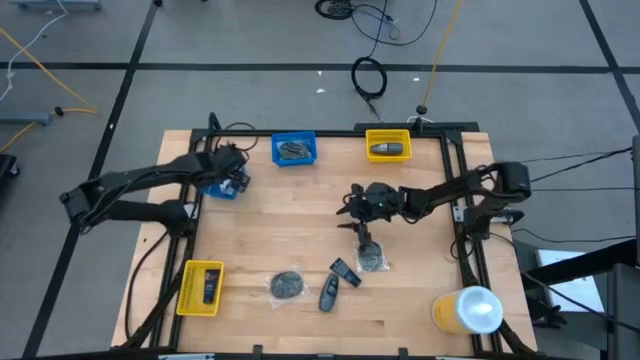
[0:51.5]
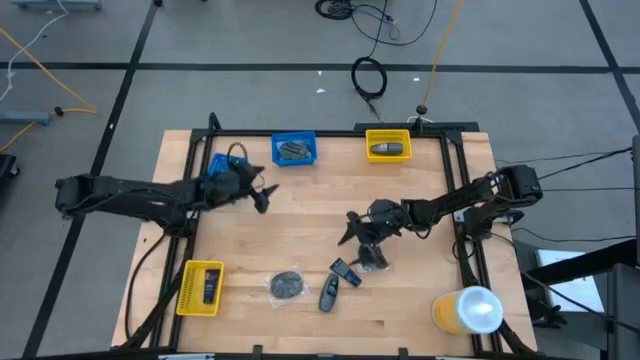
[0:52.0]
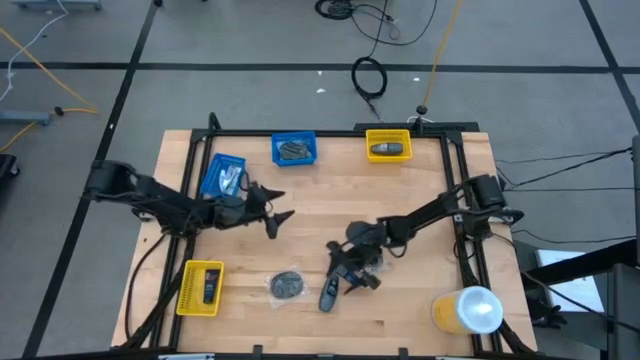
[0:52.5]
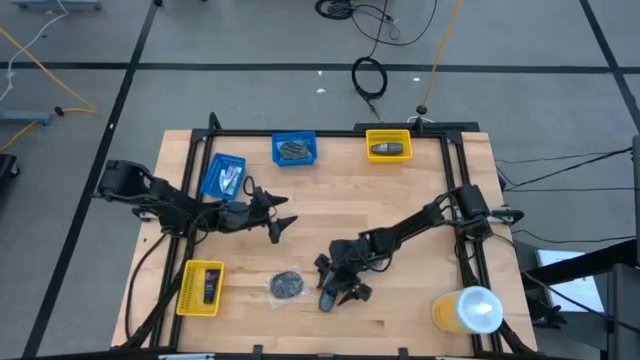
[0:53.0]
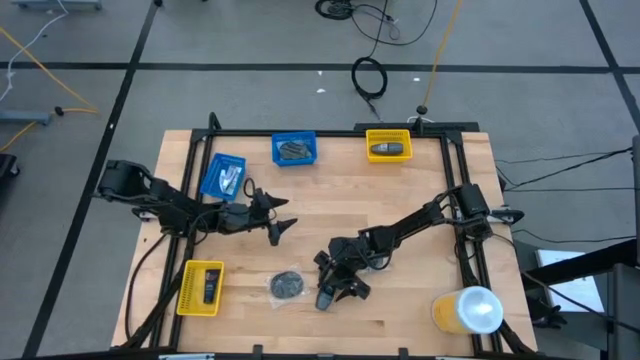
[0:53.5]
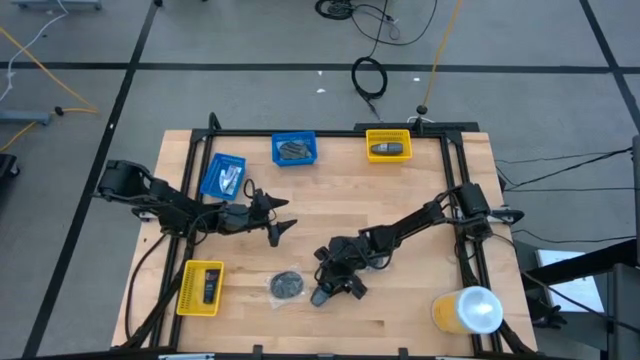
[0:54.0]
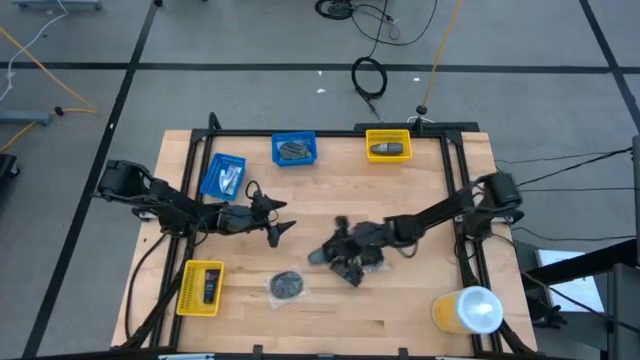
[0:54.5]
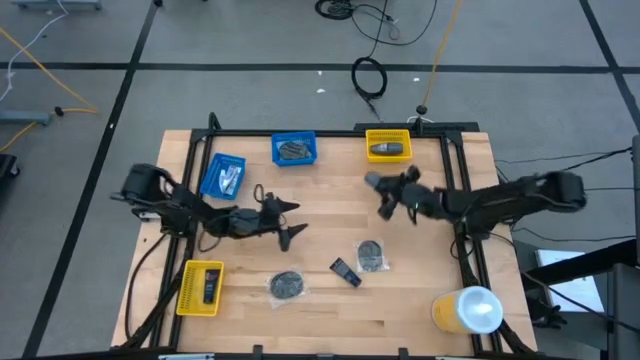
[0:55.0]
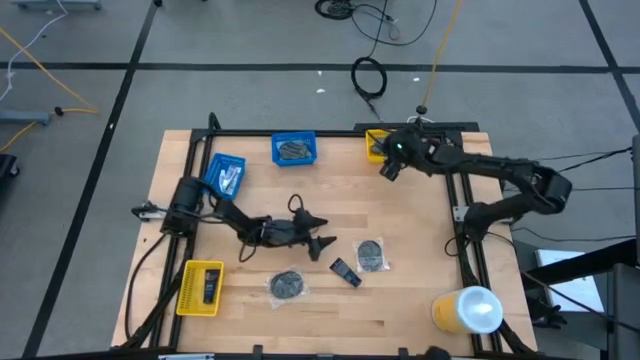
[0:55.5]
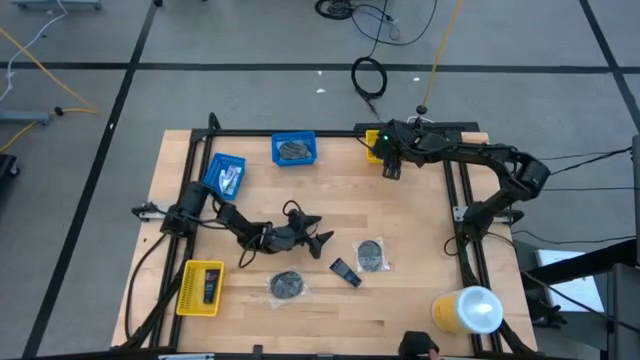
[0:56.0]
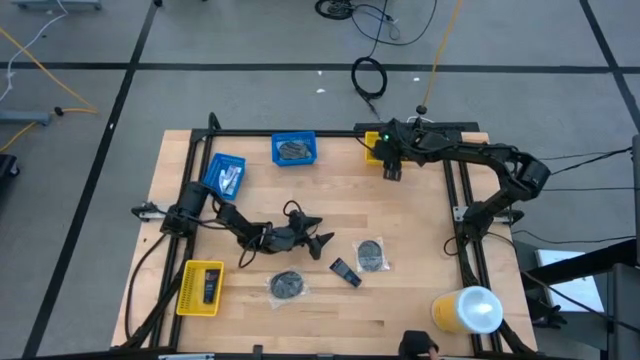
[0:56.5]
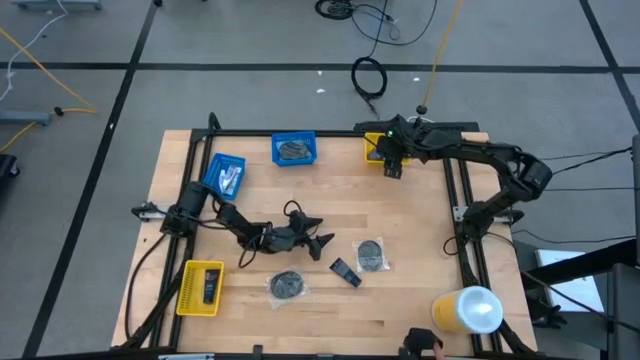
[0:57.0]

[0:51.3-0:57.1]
Task: Pick & Place Travel size toiletries
Put the black deodorant into the top yellow bin

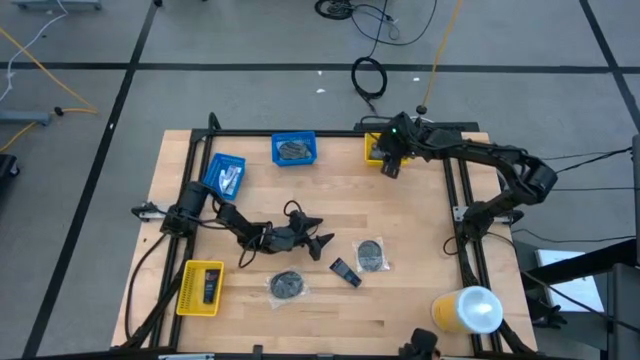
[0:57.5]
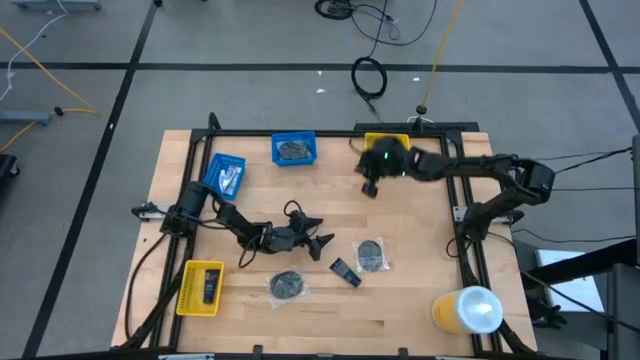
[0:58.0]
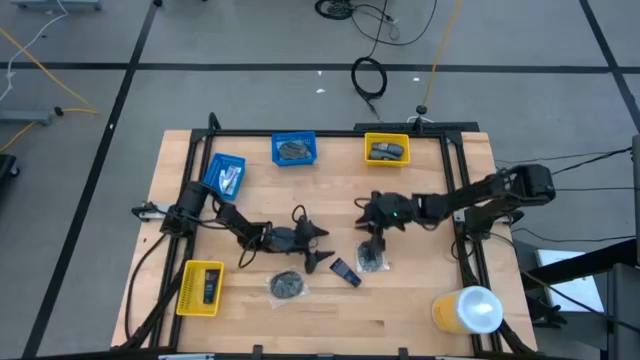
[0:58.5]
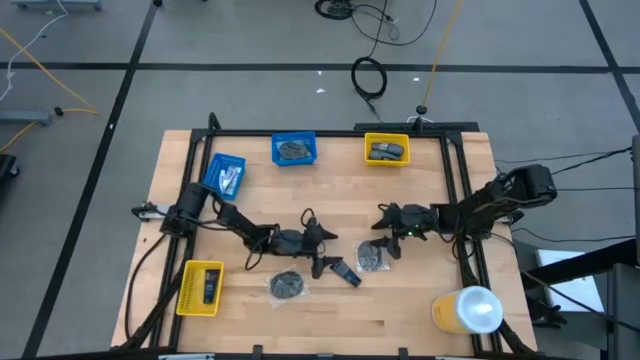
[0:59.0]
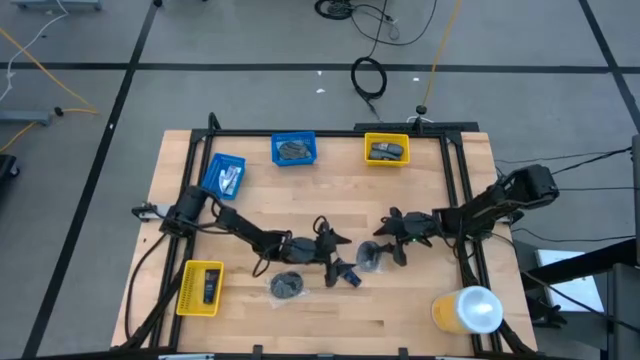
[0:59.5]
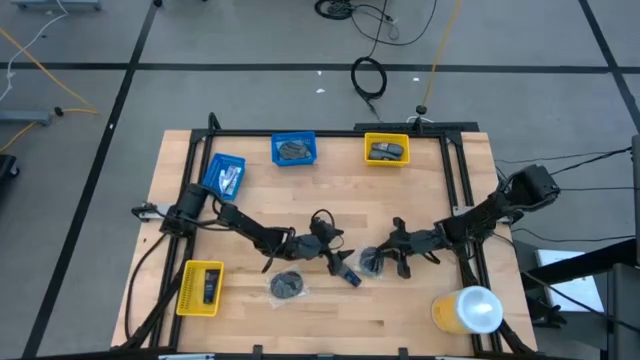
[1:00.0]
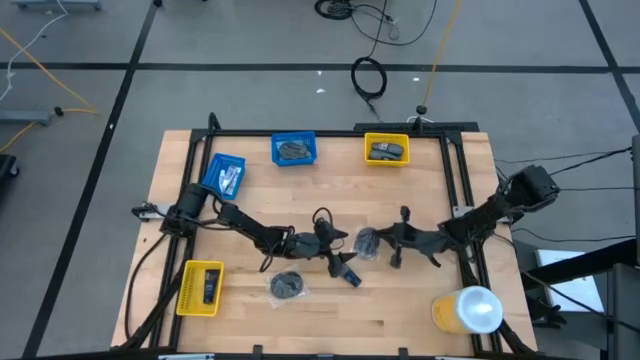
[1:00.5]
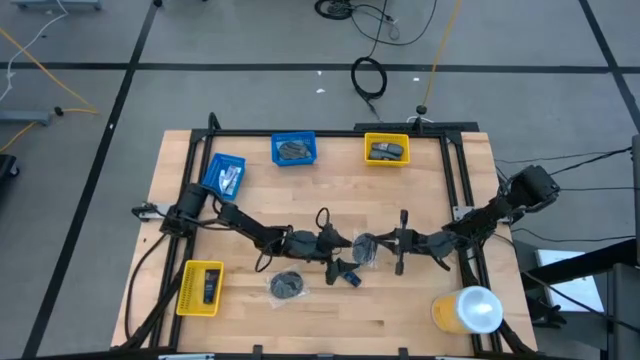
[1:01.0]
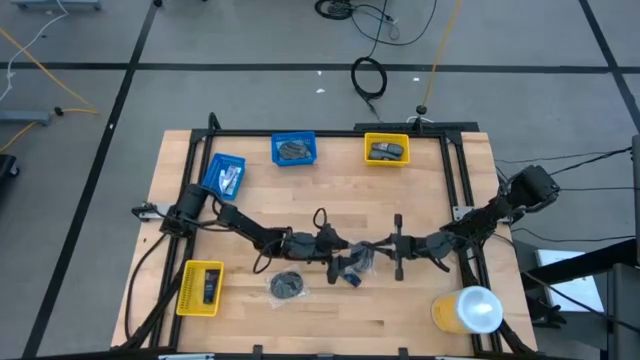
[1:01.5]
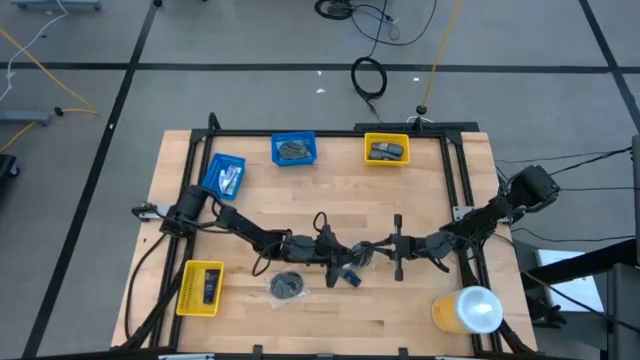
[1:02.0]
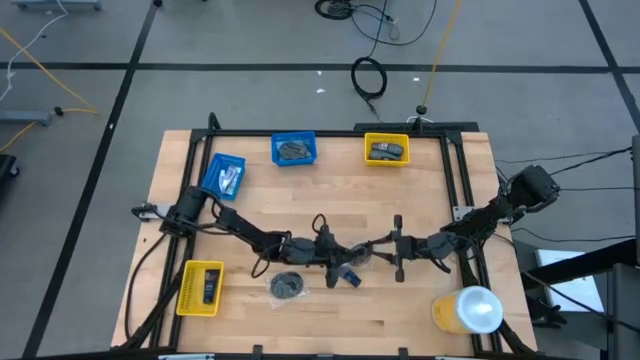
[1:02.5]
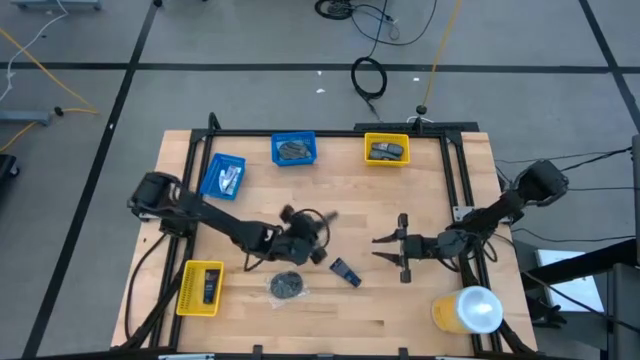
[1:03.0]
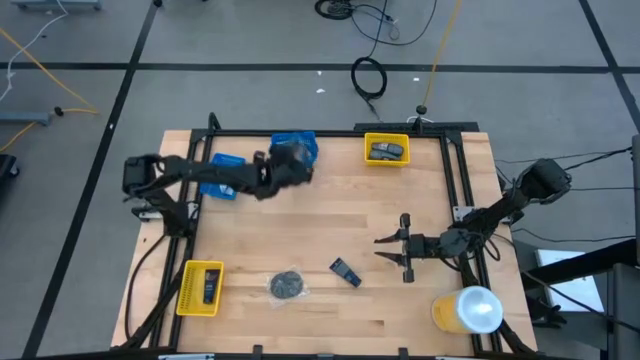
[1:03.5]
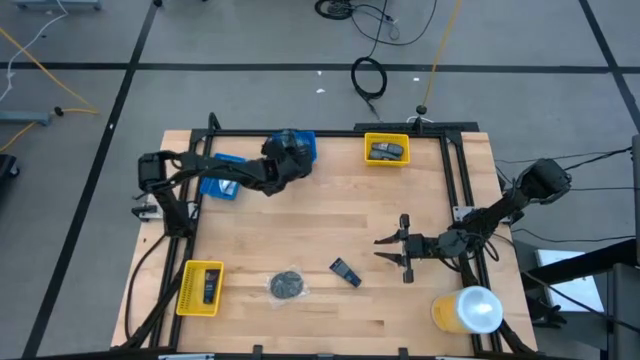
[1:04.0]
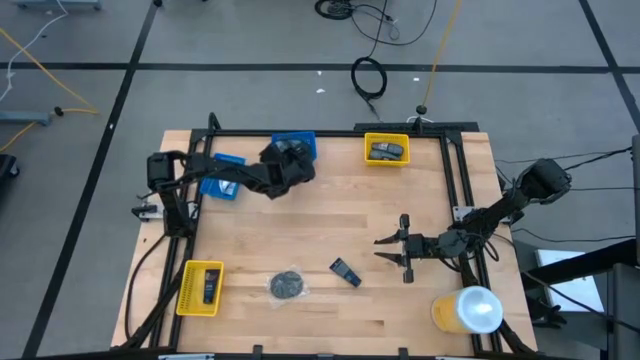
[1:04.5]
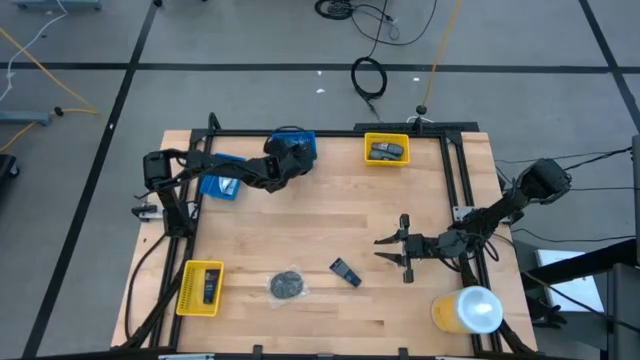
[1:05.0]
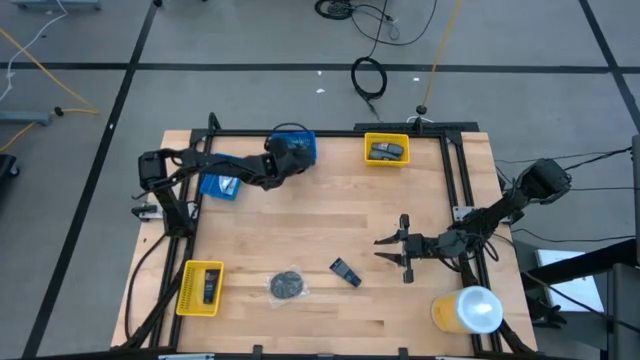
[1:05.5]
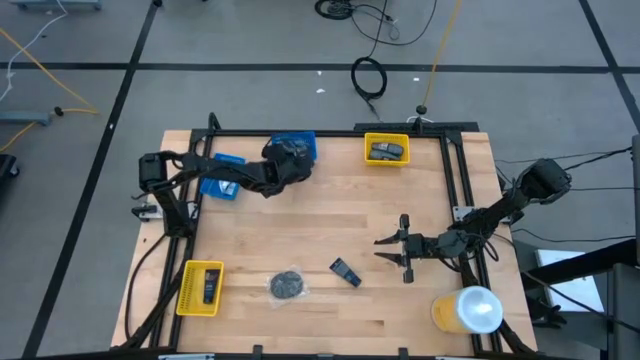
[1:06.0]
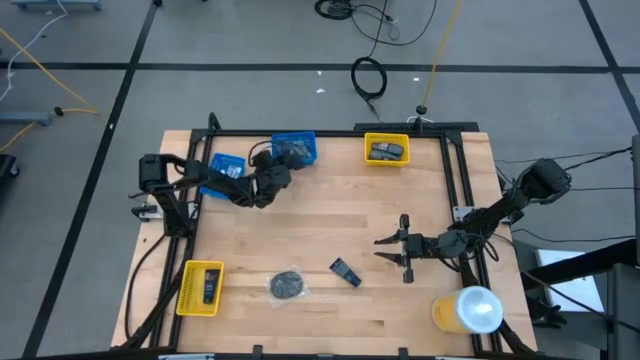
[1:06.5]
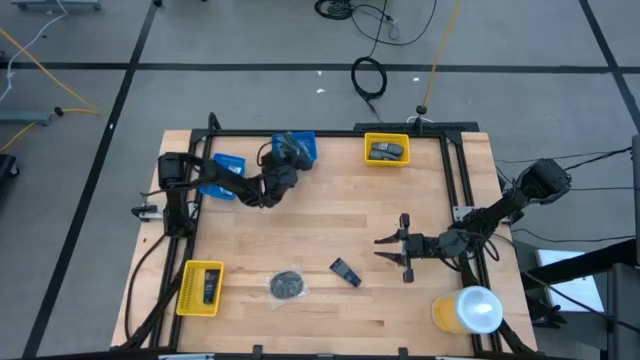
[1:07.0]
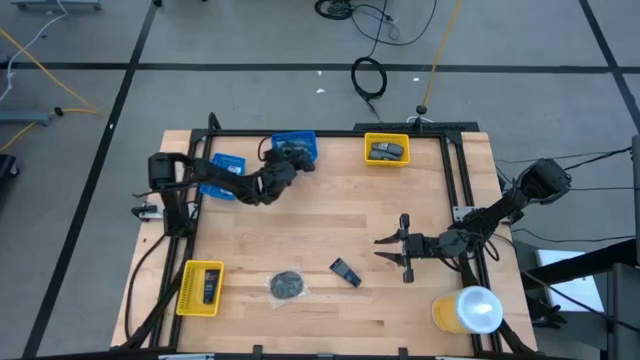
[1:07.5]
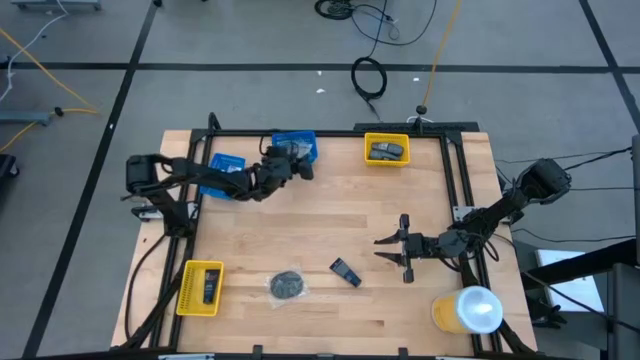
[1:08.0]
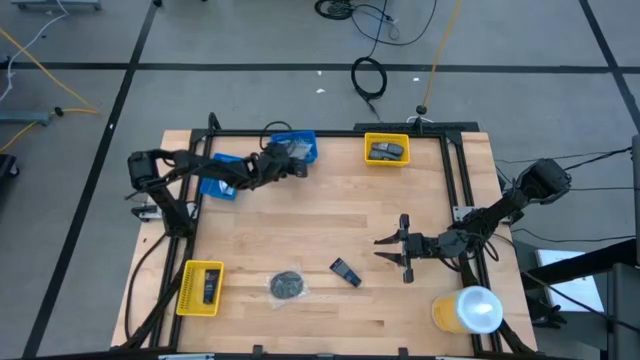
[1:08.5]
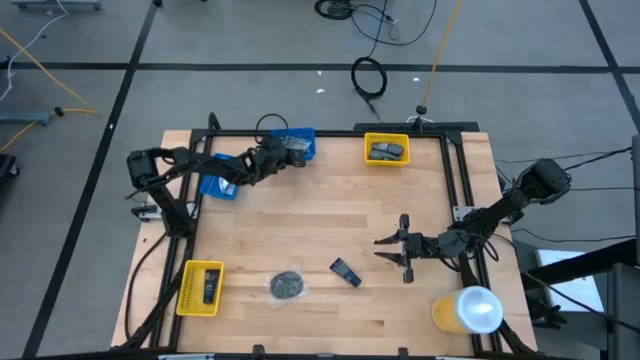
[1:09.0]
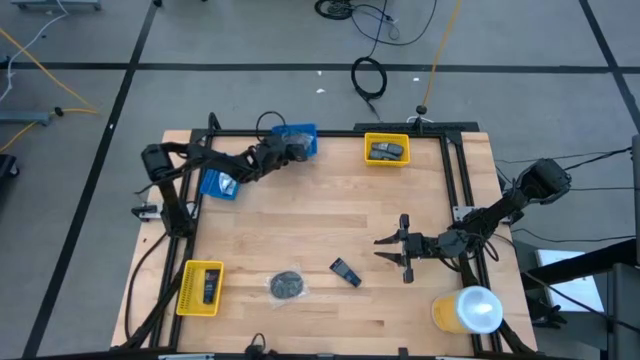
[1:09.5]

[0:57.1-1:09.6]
Put the black hairbrush into the right blue bin

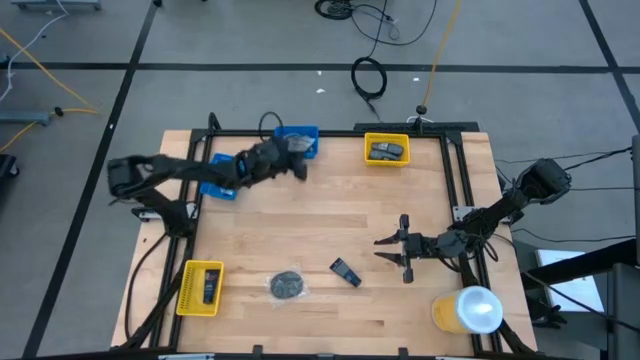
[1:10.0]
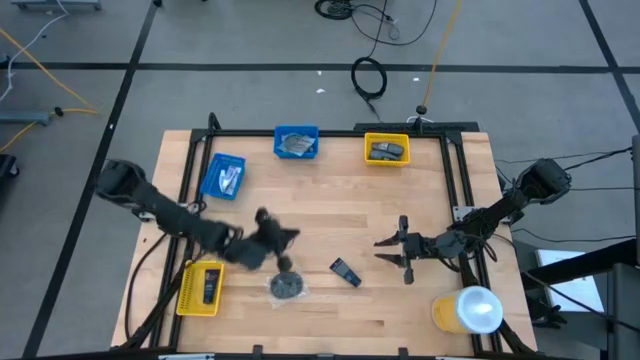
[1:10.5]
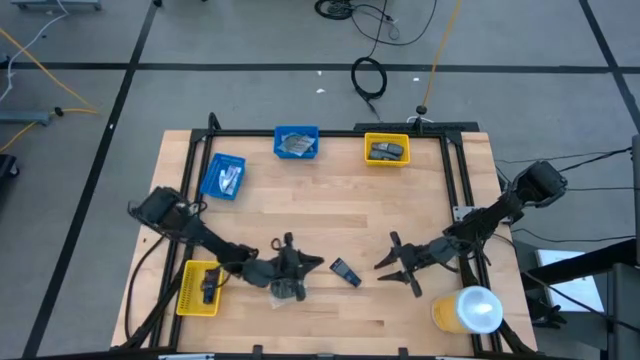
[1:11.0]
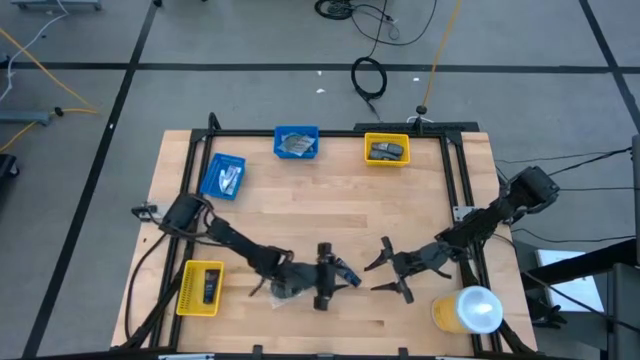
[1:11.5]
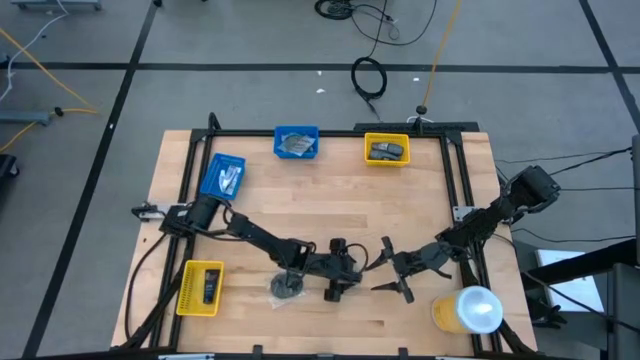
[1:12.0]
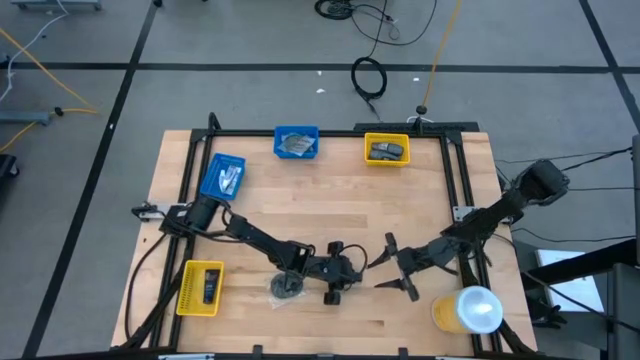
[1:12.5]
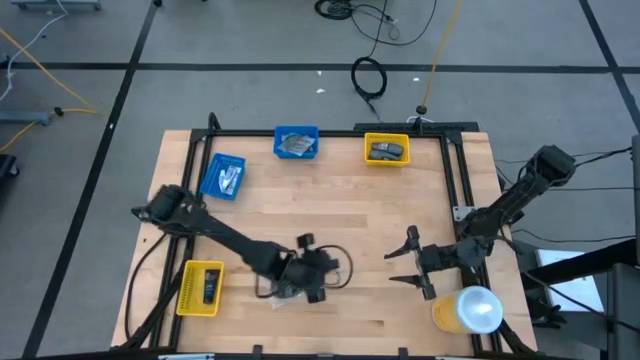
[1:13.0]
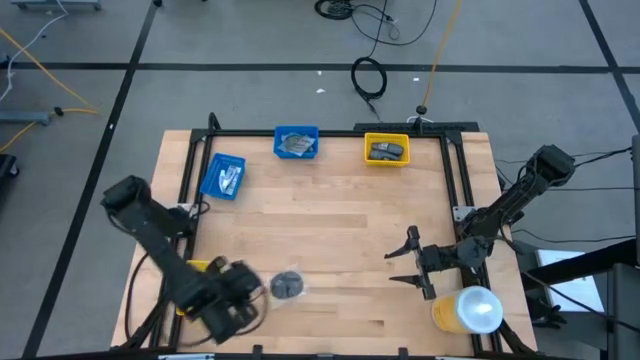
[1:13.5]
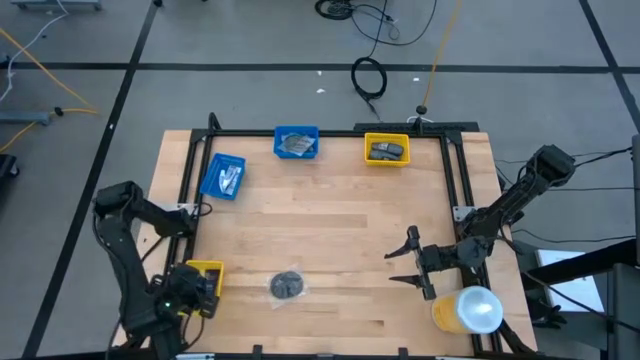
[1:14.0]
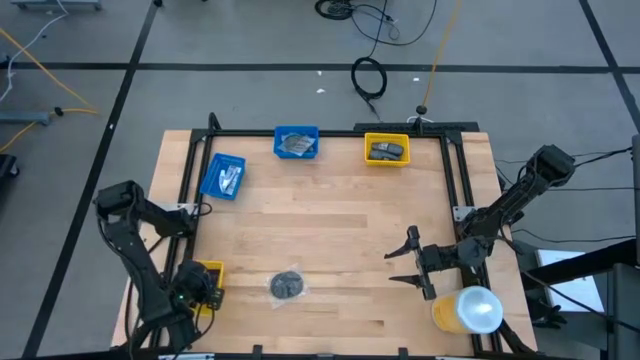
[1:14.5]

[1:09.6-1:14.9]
Put the blue shave cream into the bottom yellow bin
